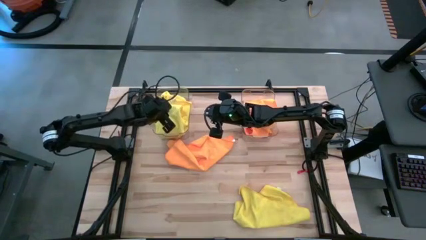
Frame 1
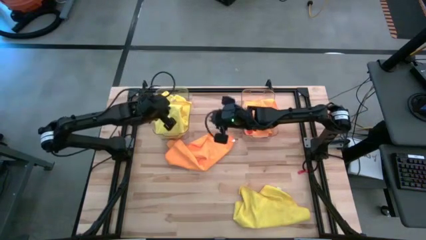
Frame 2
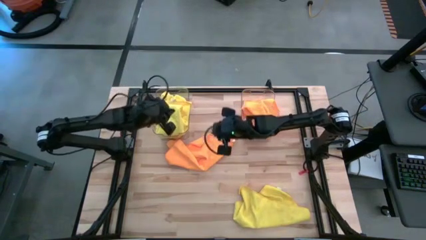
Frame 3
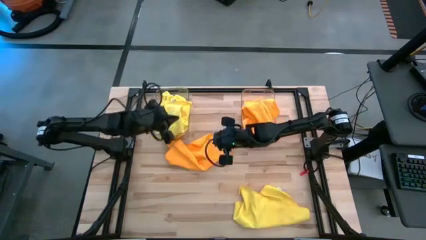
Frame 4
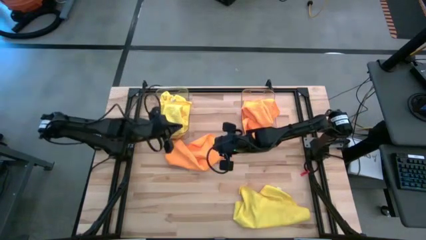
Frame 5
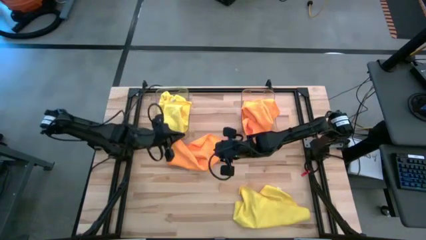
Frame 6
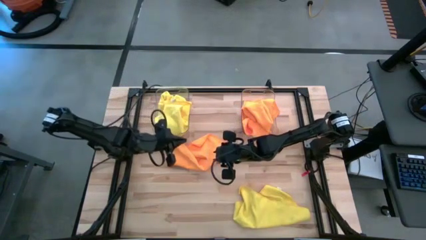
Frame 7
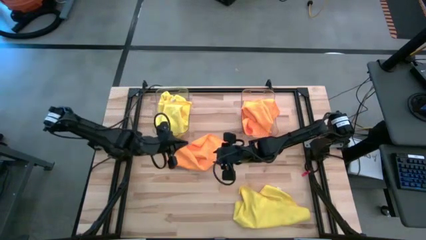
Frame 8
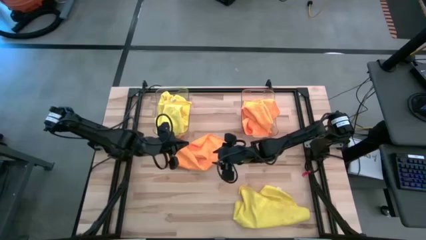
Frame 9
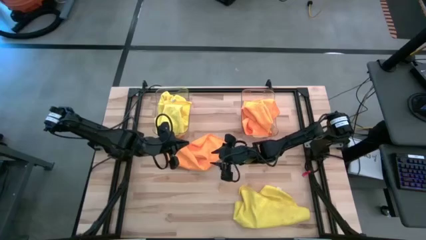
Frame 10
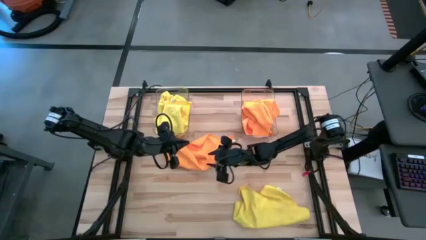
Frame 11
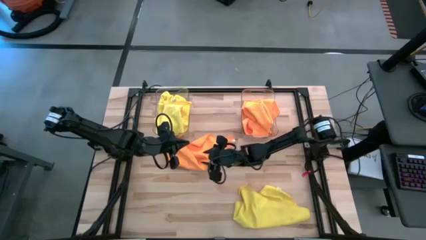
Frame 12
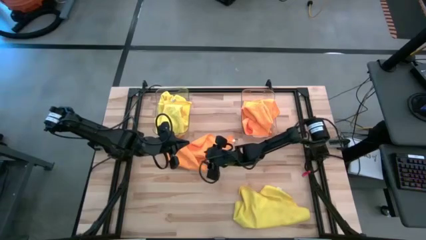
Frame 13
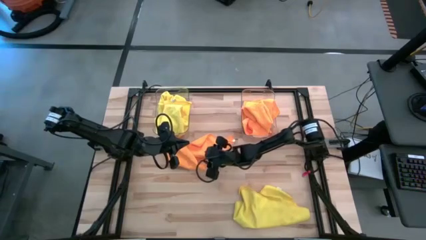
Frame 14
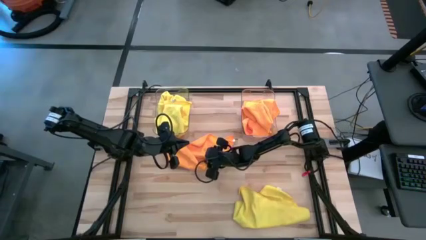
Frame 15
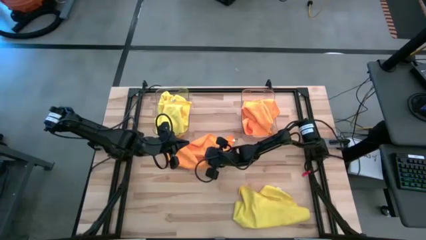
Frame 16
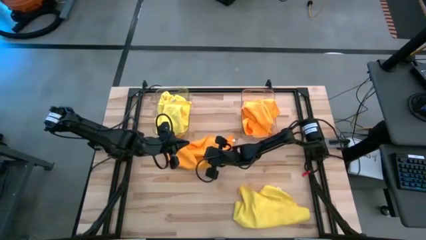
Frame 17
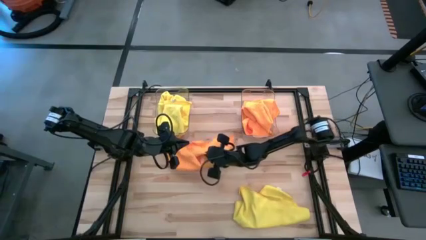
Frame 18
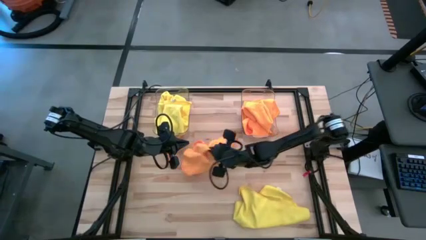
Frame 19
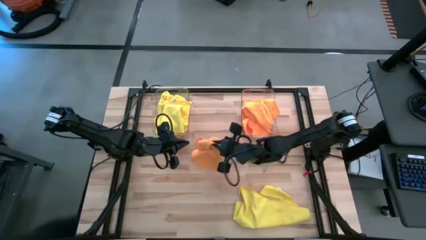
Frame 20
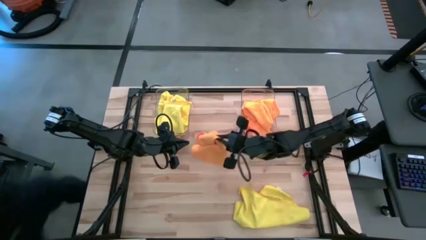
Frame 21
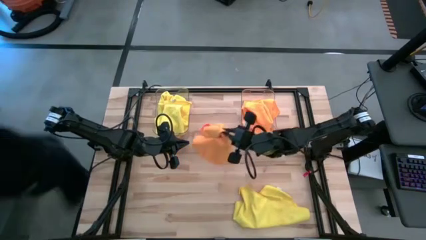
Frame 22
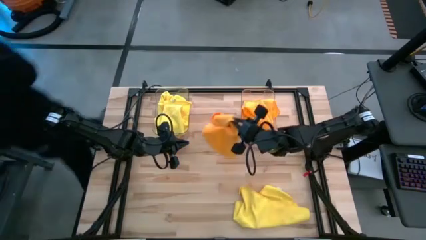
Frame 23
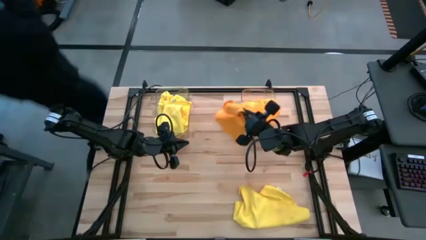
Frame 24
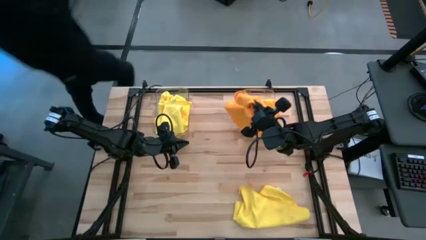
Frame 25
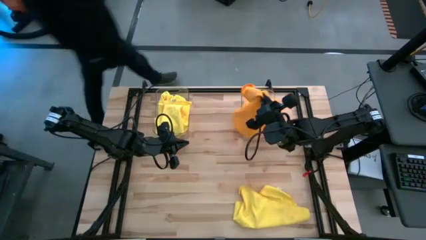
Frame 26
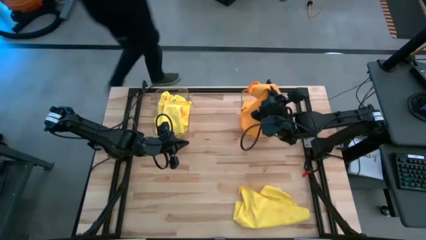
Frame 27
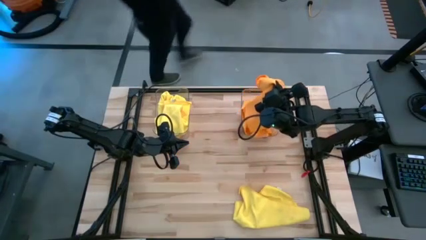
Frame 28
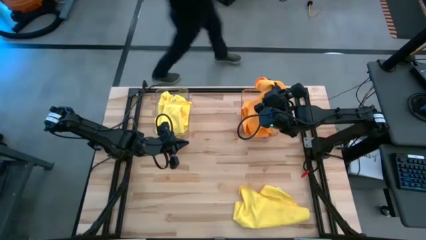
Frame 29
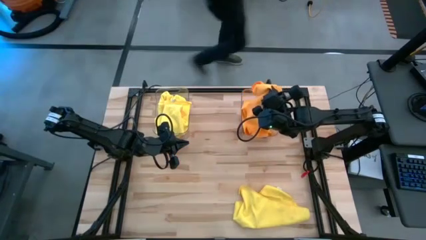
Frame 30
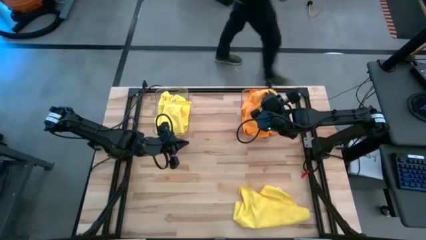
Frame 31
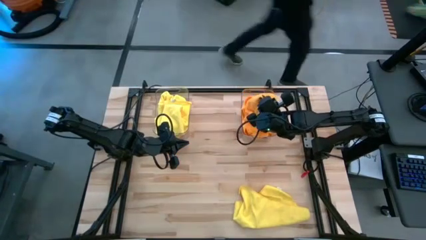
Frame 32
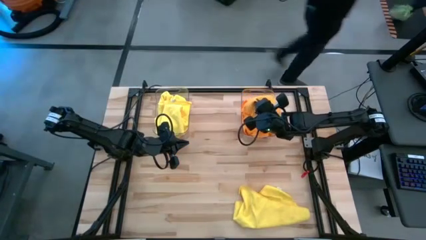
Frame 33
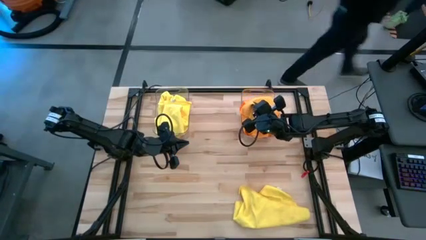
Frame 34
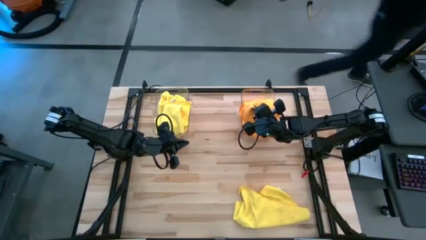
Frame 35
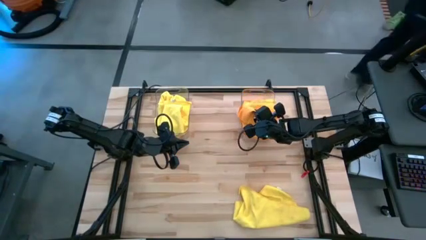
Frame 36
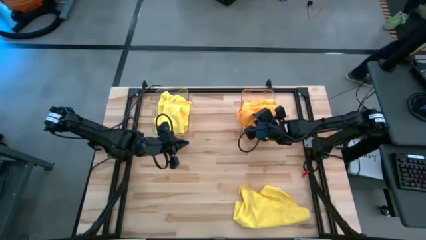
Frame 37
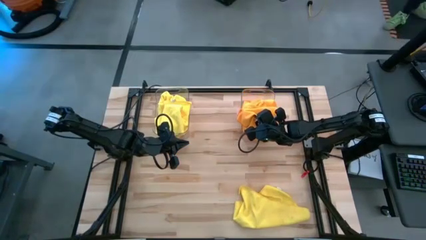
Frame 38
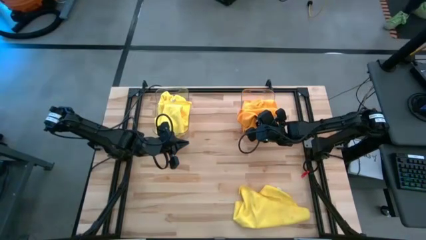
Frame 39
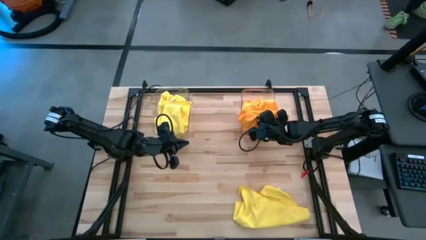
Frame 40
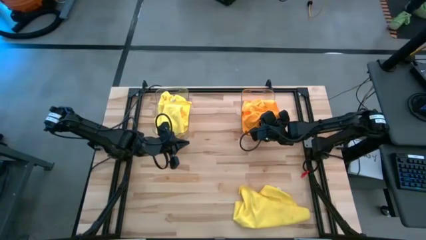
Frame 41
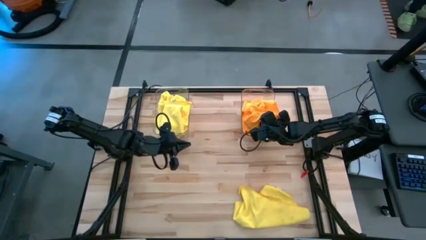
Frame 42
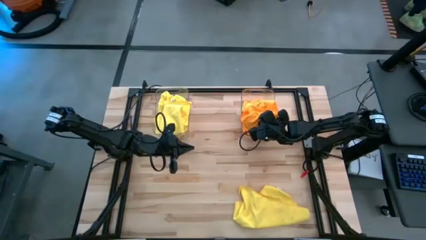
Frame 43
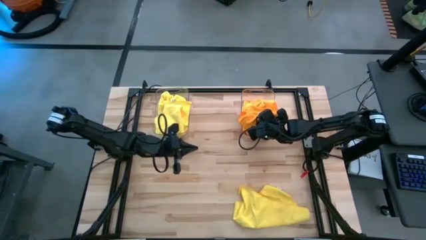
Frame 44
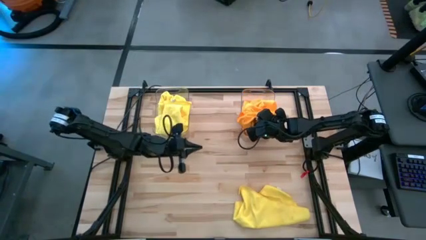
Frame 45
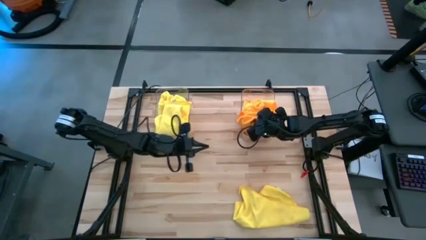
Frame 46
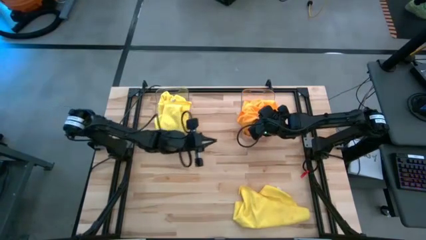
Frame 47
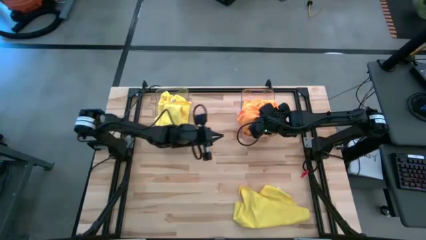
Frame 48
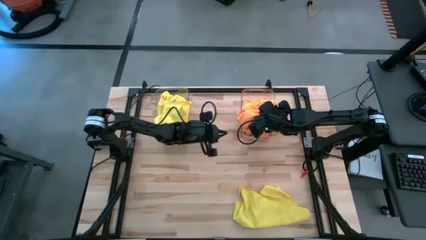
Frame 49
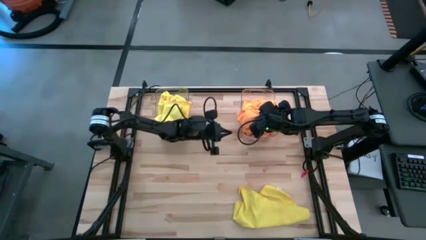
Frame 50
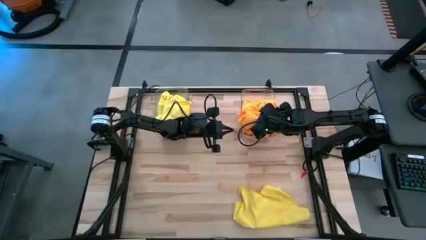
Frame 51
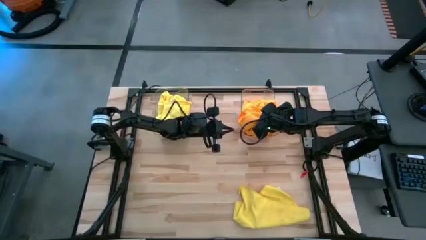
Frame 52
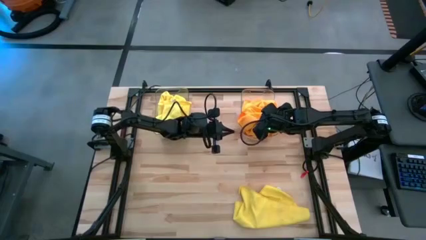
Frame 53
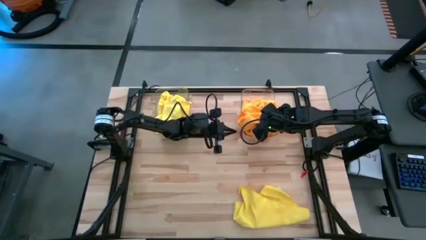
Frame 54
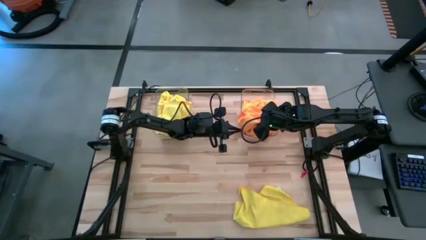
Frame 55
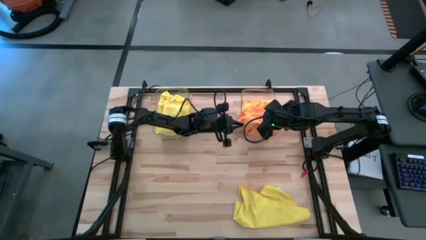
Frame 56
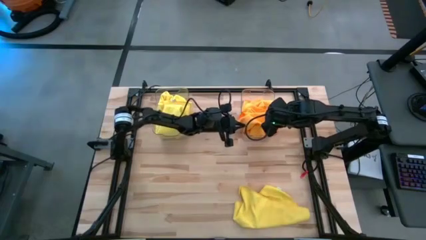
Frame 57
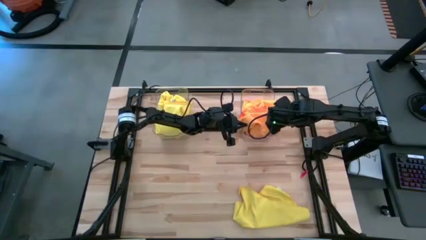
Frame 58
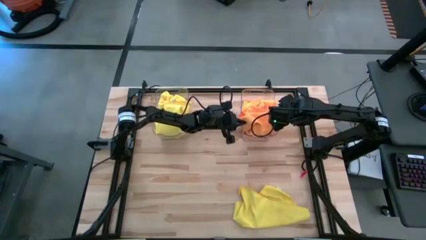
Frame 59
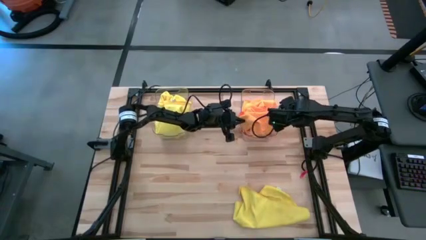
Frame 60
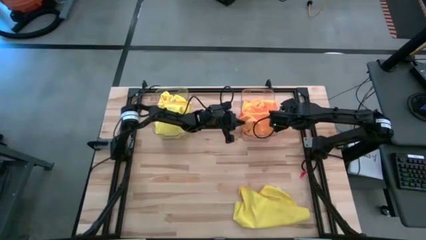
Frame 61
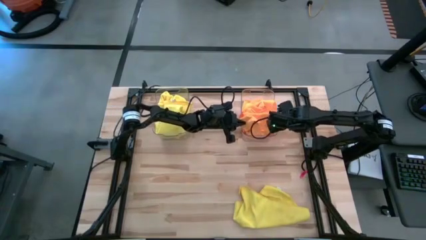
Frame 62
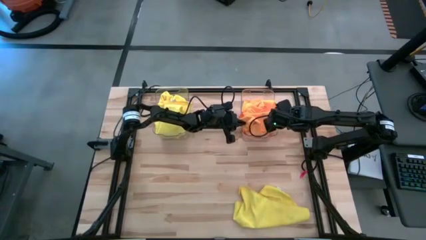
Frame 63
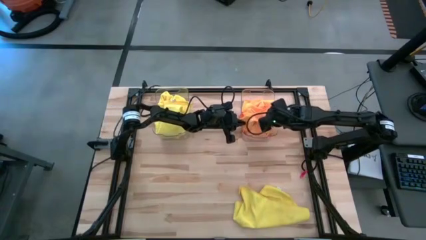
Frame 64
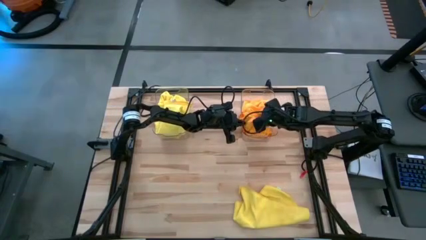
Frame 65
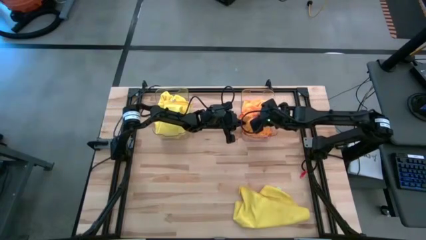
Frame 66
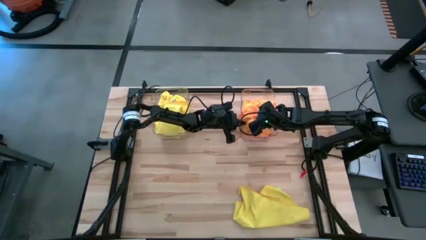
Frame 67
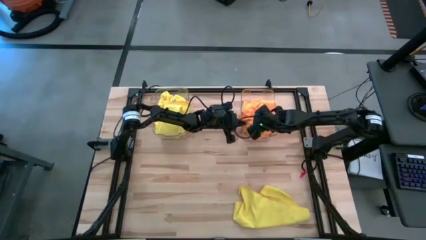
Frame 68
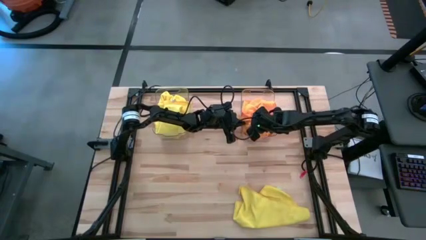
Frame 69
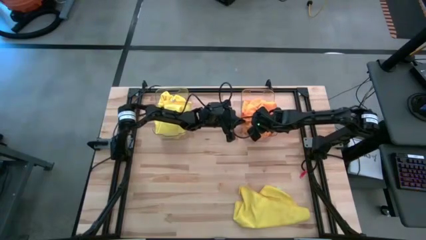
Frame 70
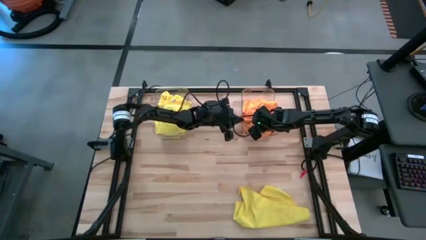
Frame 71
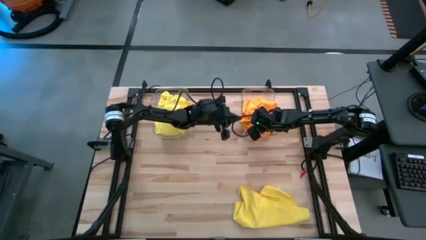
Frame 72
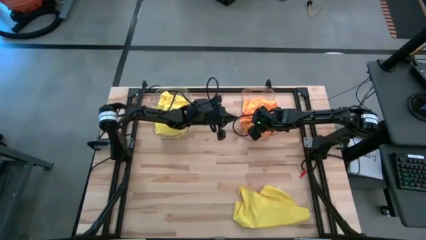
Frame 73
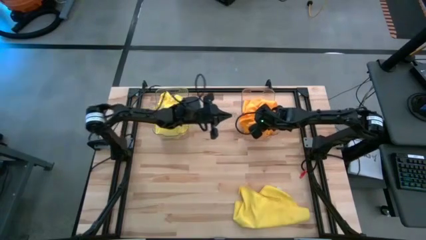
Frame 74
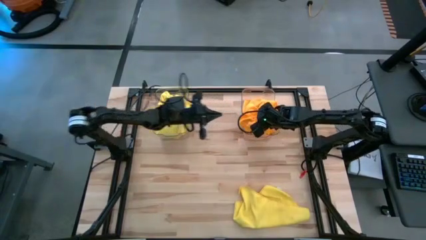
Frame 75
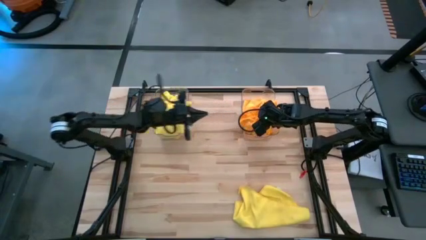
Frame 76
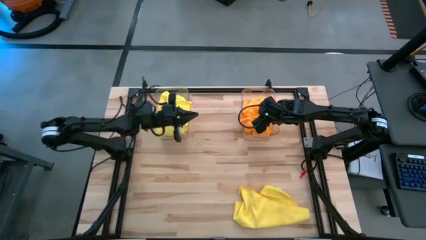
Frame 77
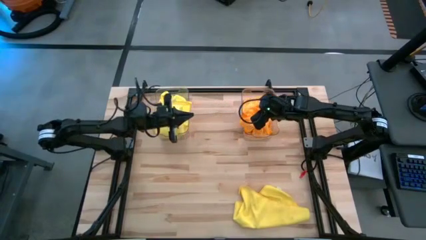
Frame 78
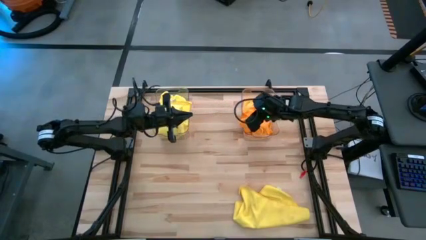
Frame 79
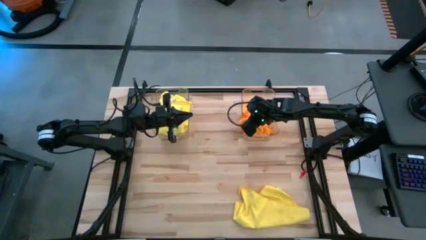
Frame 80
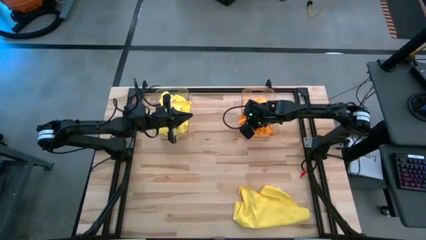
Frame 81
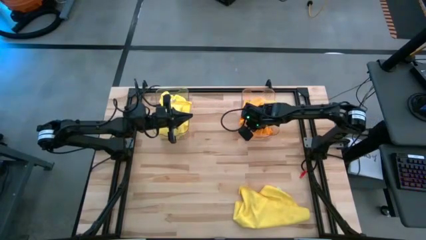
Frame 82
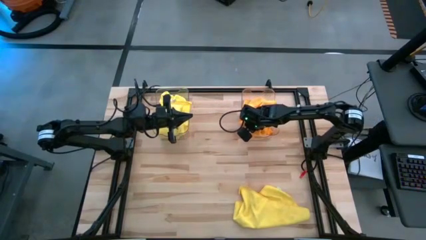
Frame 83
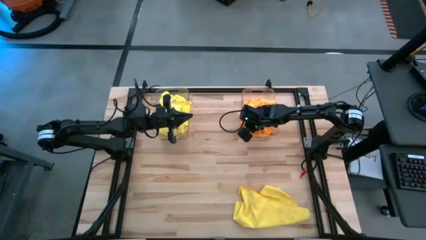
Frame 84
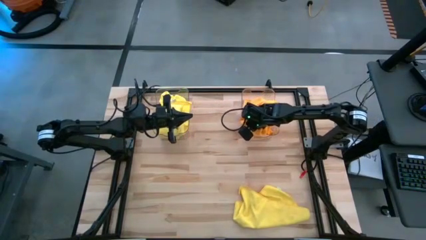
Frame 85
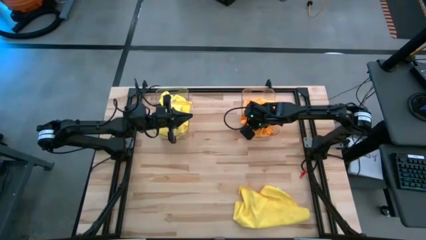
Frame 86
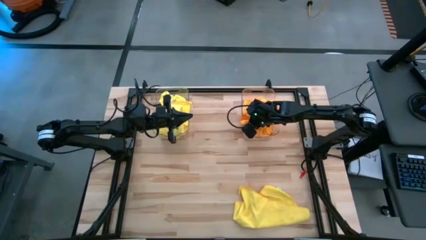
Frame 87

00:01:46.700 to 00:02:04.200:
Task: Sort microfiber towel by color & place in baskets
Put the orange microfiber cloth into the right transparent bin
